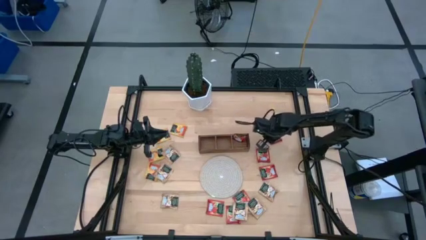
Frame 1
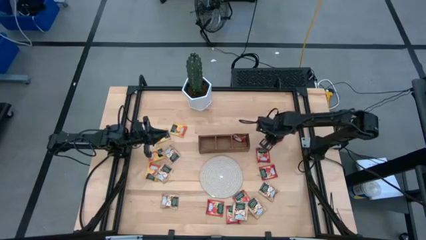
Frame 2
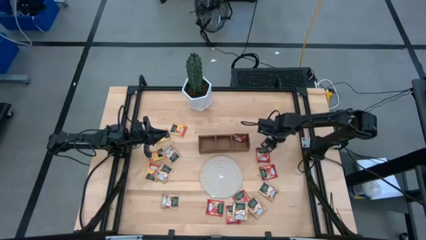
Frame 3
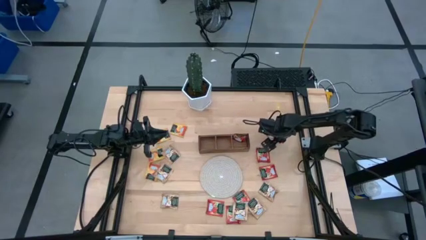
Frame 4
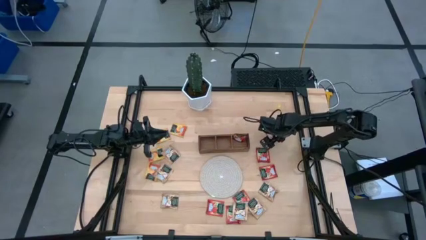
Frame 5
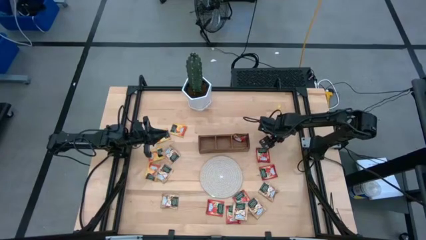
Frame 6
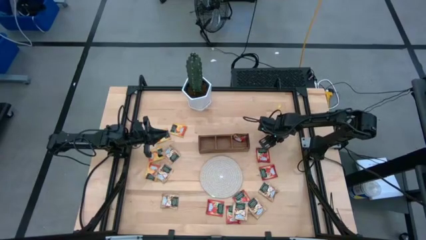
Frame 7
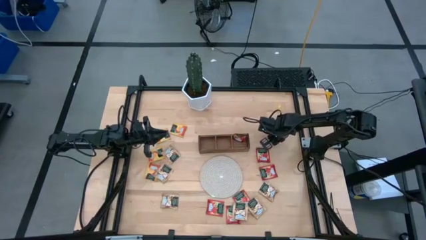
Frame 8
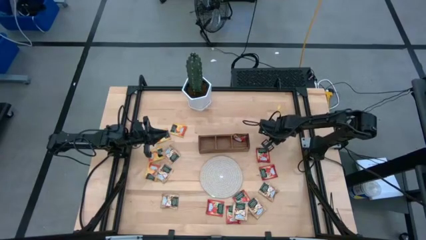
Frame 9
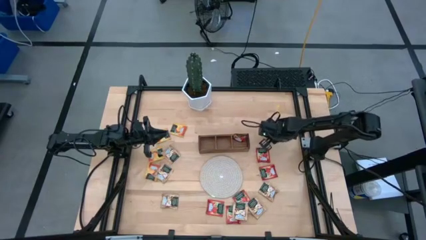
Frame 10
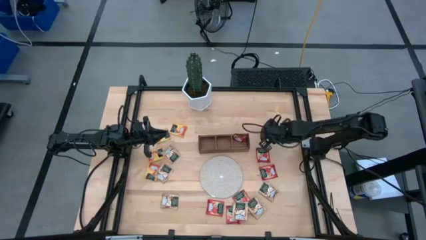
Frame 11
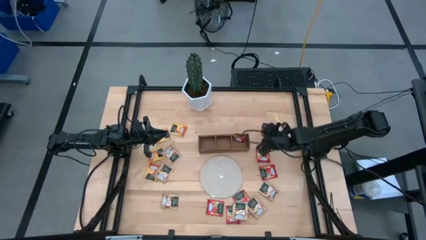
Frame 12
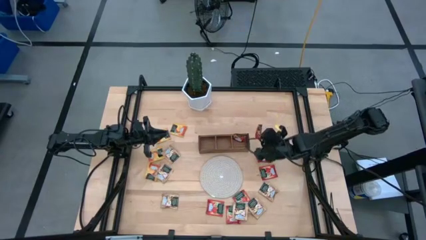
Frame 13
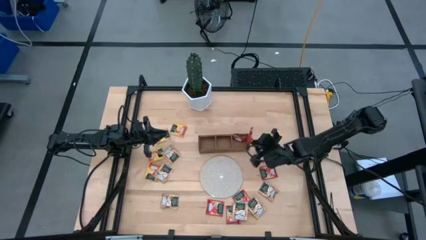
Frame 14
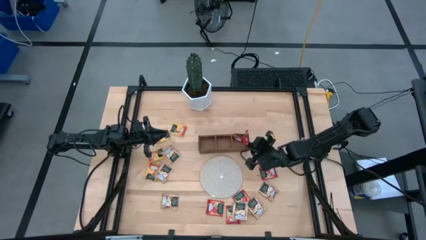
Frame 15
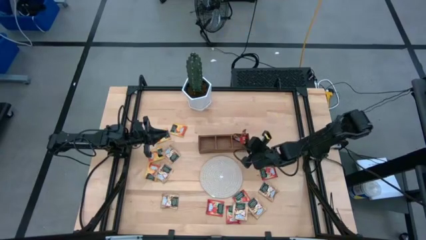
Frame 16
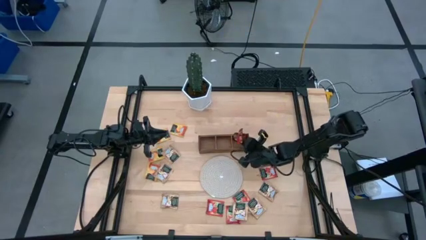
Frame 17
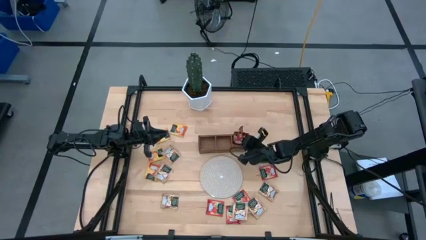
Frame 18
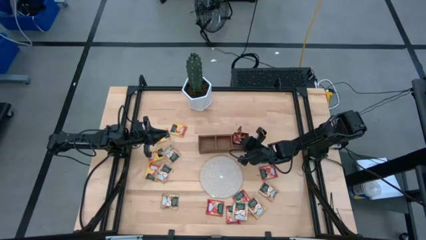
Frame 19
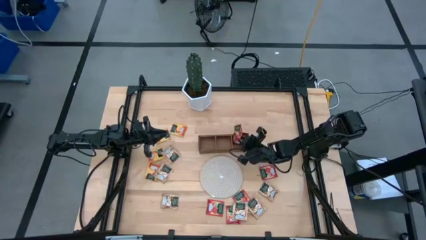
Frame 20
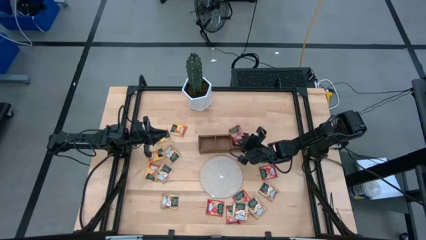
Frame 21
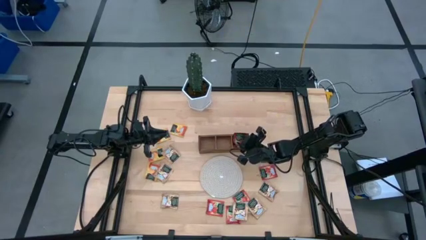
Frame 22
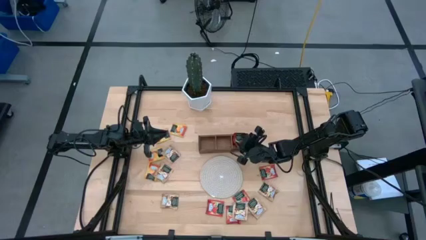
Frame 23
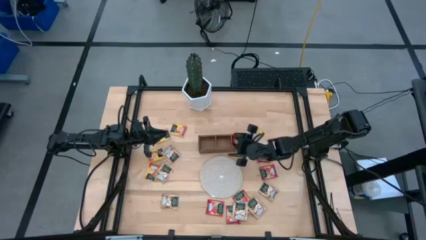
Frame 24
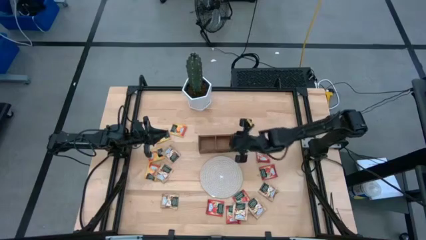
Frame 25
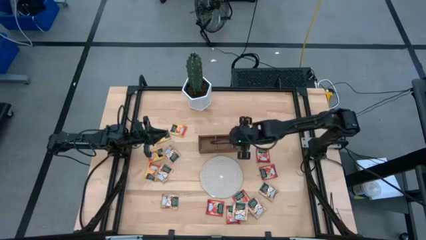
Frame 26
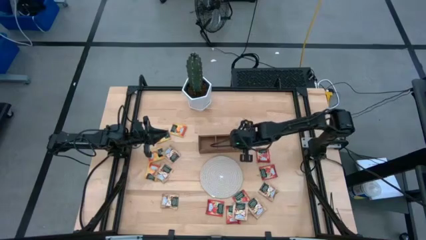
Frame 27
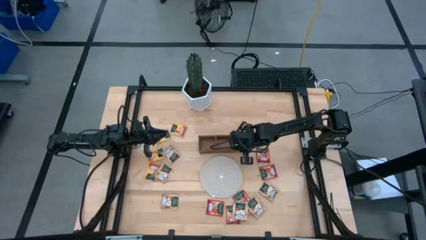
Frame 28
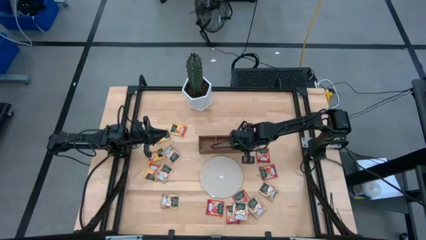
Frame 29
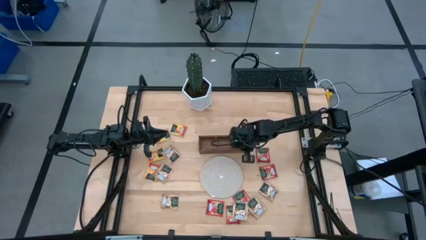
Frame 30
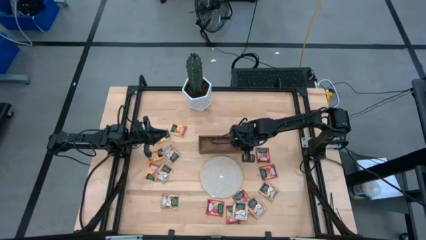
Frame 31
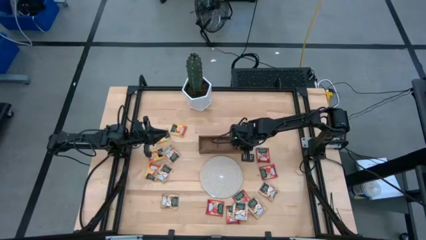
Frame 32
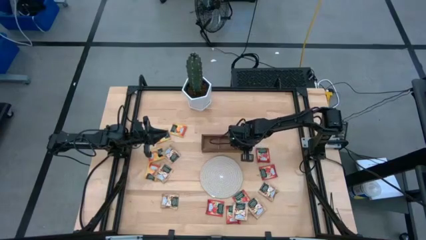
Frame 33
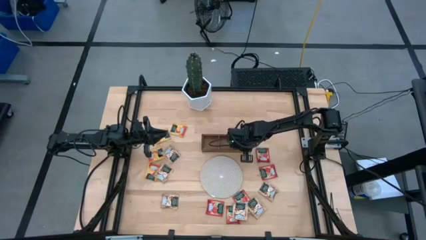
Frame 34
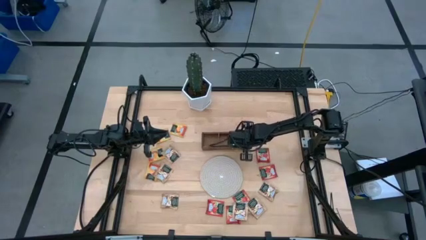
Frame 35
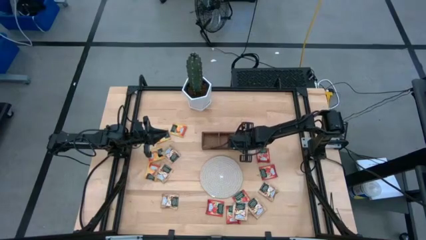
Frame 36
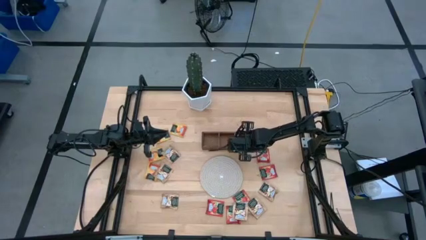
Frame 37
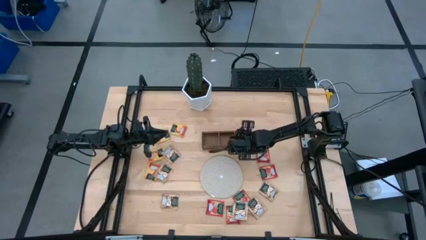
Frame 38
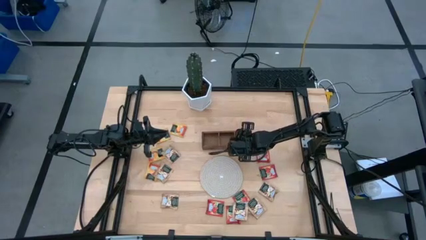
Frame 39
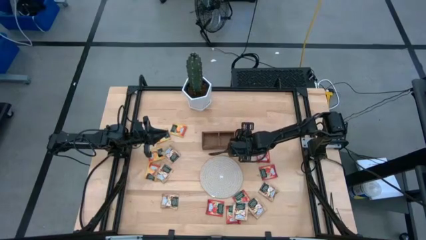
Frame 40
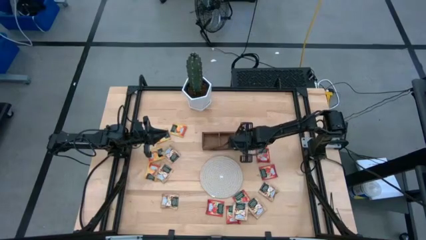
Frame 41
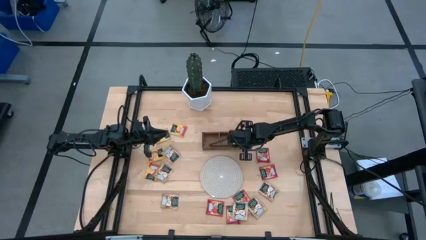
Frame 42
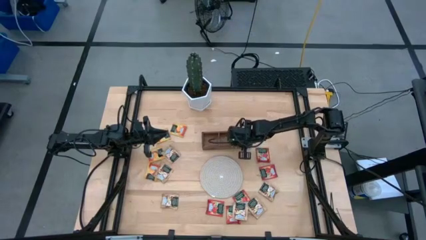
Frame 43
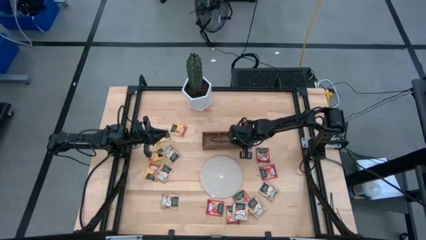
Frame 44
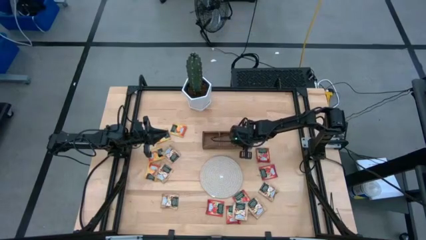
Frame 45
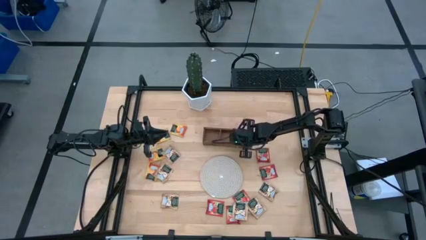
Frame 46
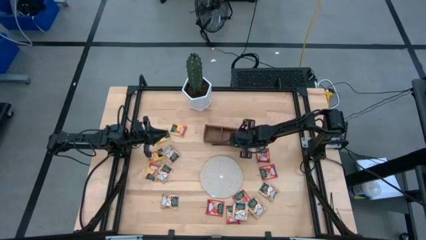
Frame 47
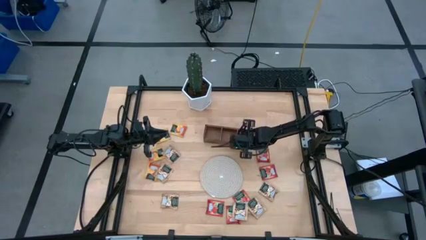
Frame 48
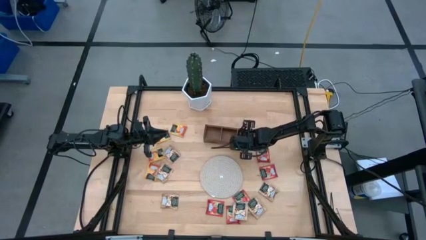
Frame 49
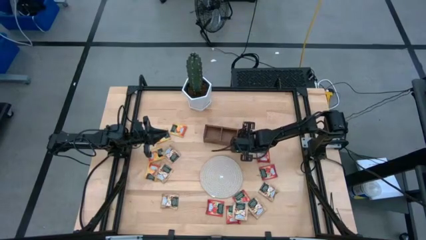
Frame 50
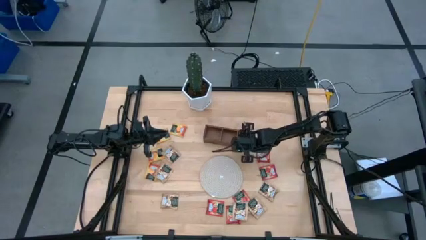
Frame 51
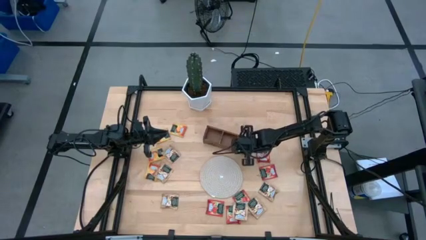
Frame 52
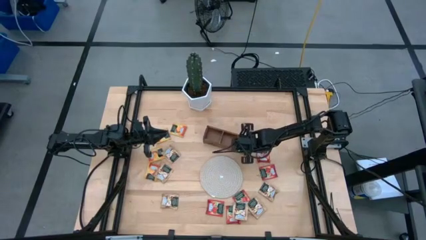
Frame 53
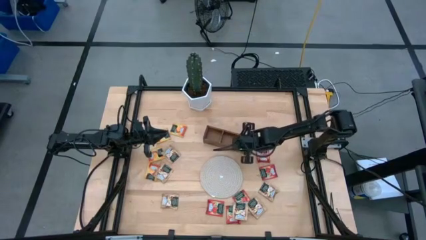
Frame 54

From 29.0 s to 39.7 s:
Task: Pick & Place Tea
Put the red tea bag into the right section of the wooden organizer

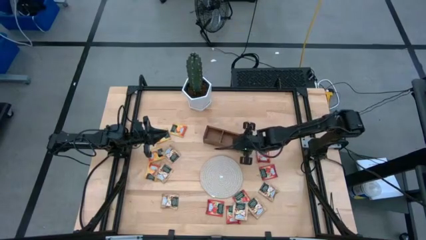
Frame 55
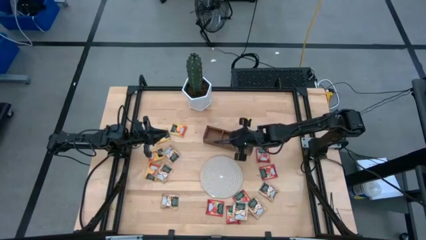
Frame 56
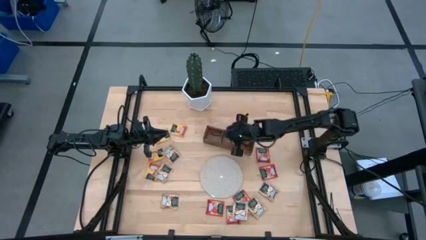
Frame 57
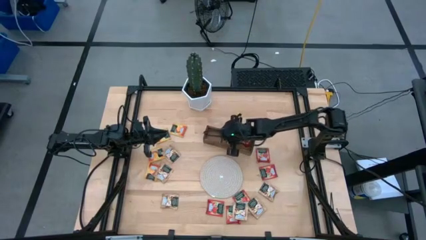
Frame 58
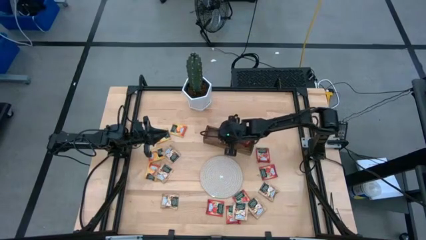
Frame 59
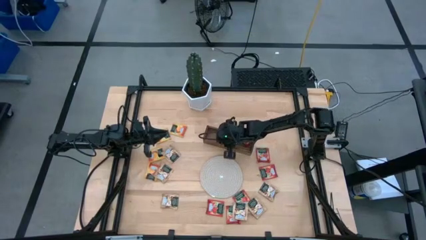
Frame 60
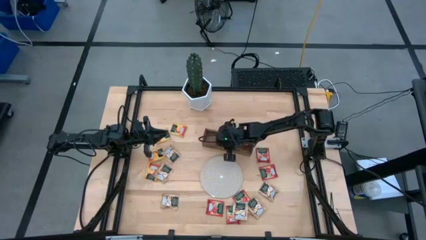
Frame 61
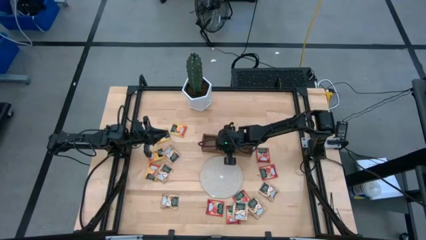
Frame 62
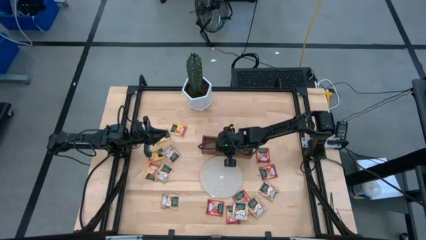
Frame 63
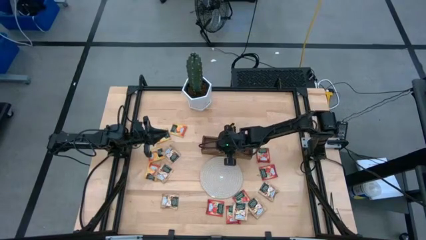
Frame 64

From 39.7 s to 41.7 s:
Adjust the wooden organizer

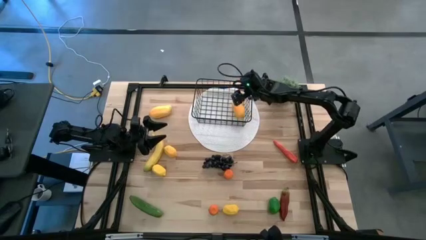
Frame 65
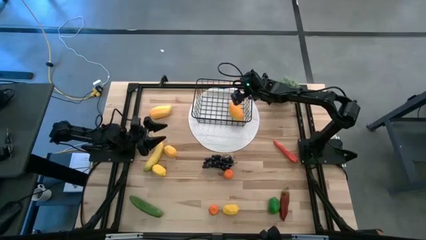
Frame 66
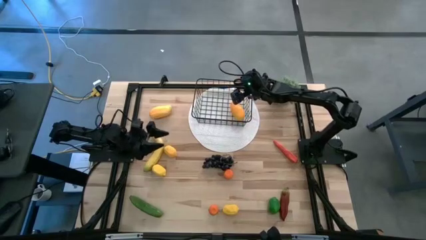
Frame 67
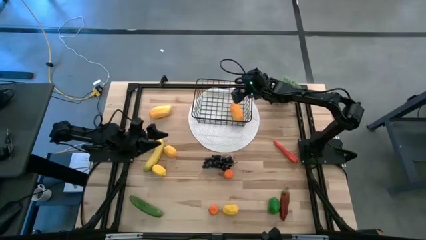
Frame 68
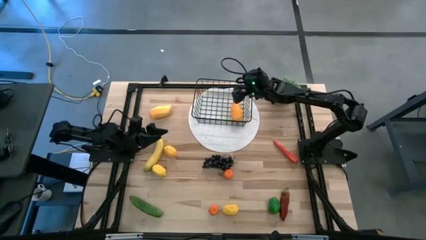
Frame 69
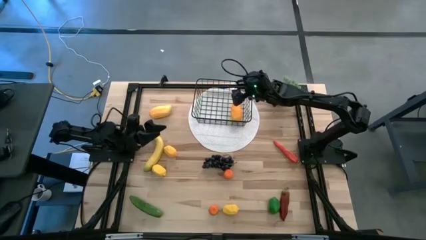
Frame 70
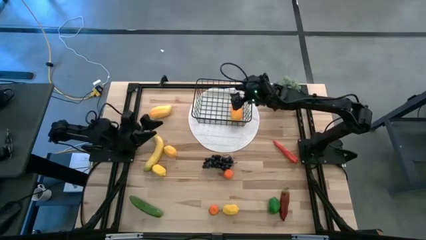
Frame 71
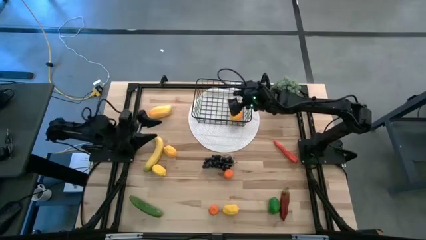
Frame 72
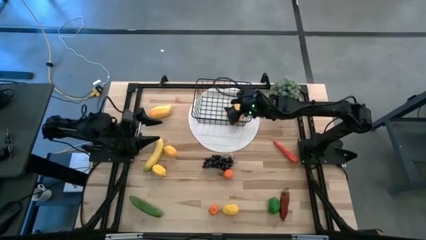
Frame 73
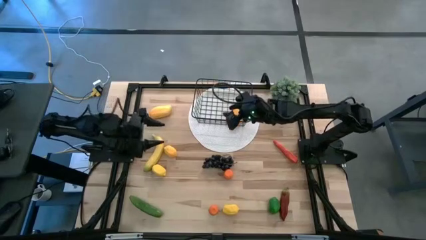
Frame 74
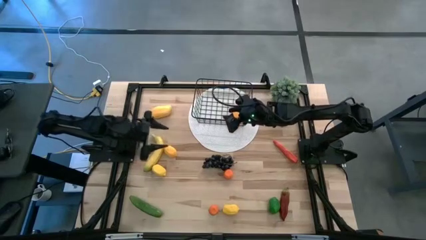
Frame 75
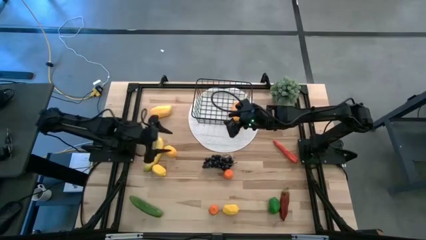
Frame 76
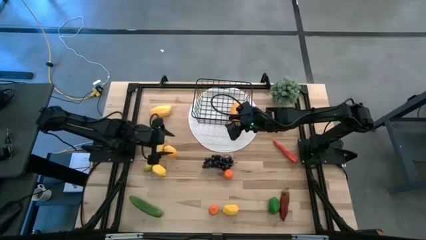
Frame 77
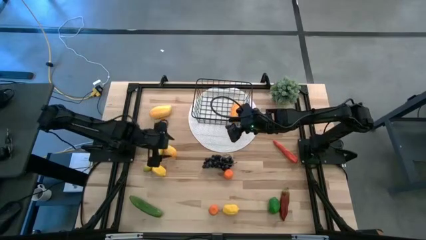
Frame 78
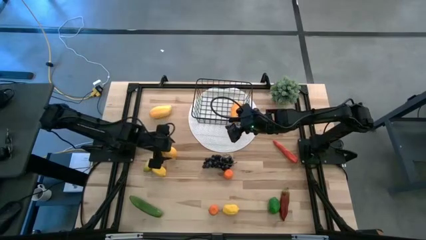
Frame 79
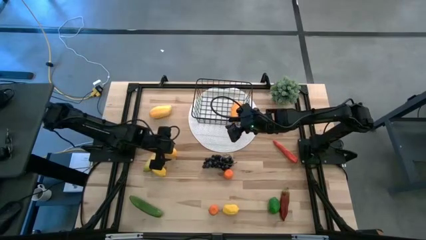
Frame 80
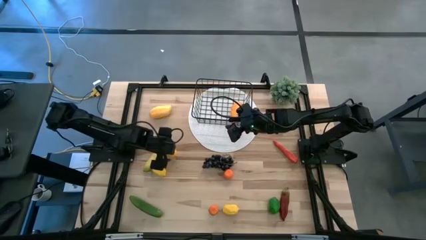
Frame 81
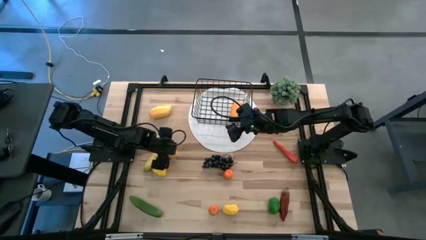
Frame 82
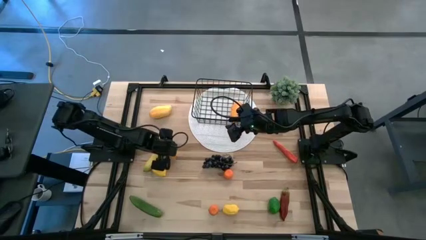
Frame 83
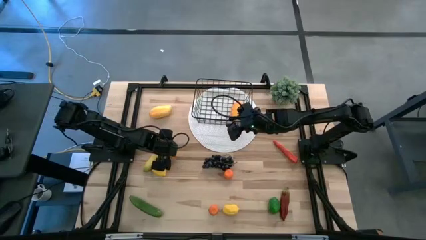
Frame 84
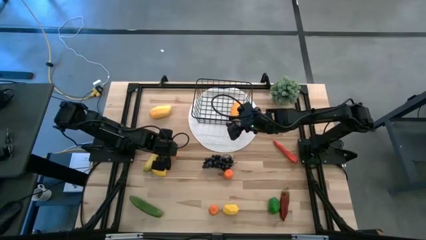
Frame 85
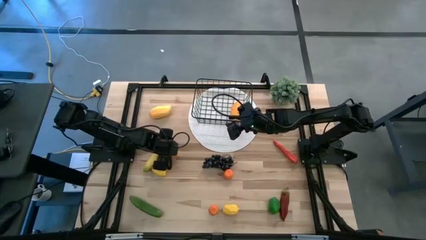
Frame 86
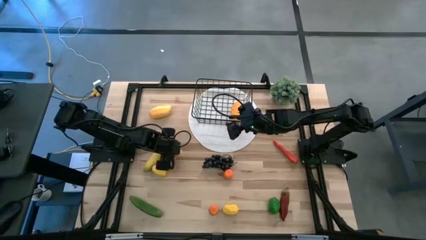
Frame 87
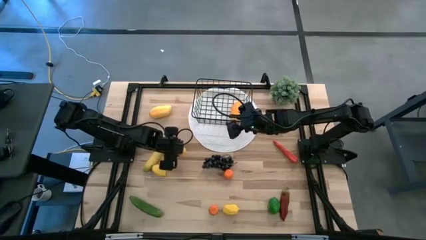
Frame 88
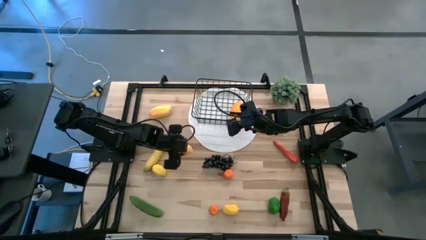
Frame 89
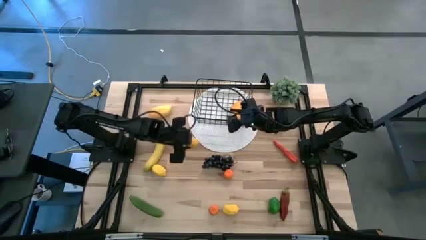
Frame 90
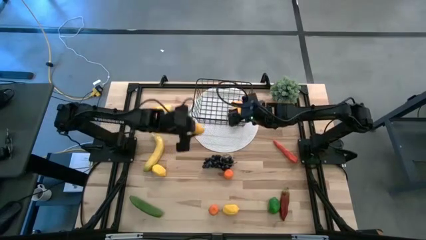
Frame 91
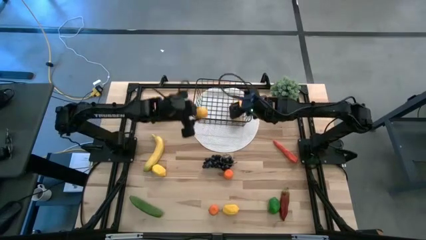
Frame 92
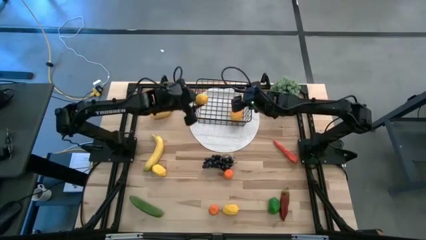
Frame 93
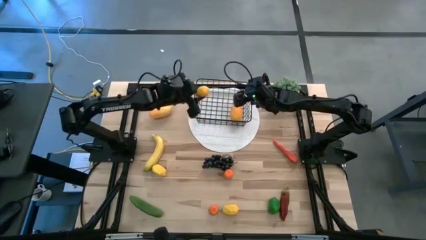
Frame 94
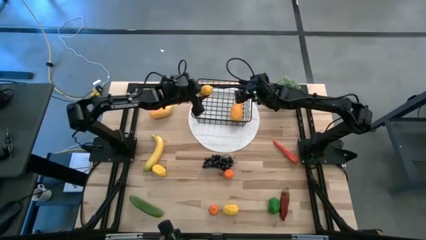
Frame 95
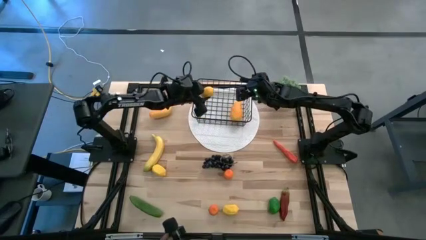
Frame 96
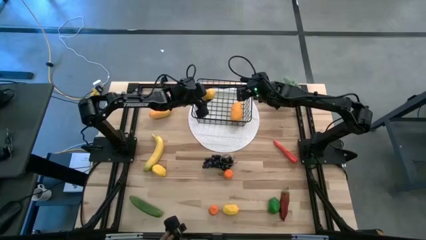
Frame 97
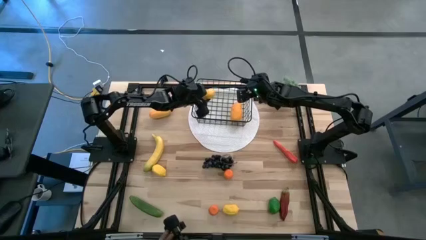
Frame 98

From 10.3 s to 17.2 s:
Task: Build produce basket
Put the top left lemon into the mesh basket
